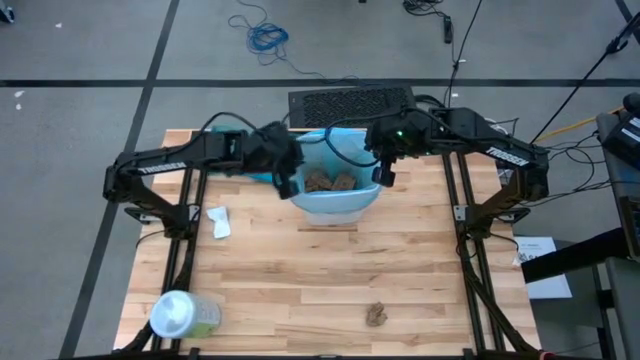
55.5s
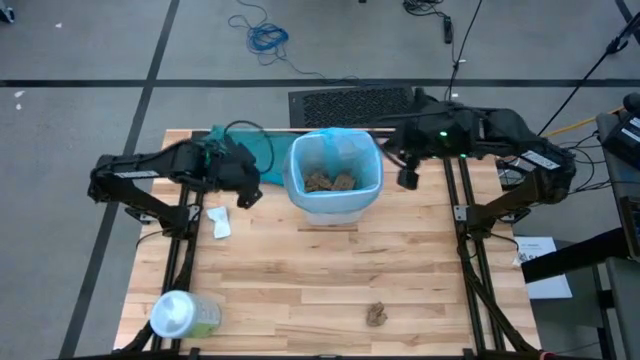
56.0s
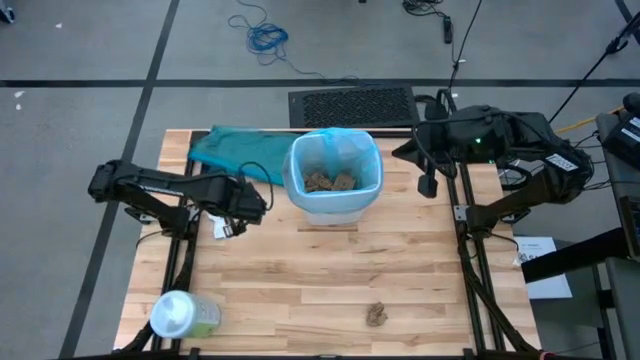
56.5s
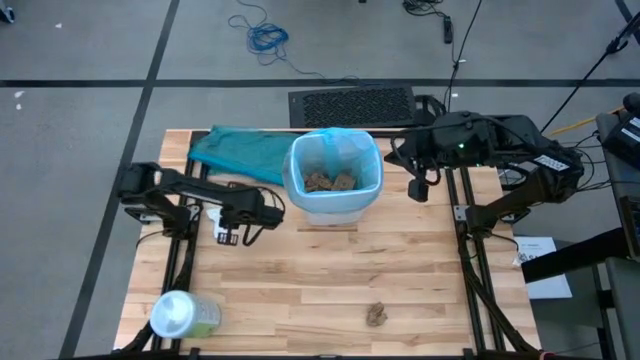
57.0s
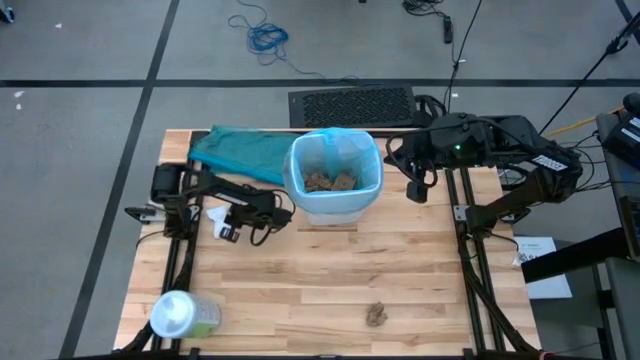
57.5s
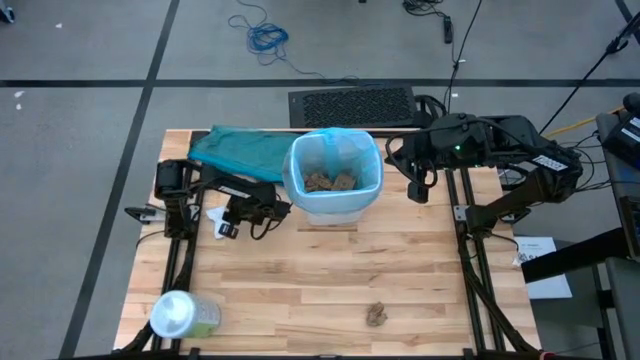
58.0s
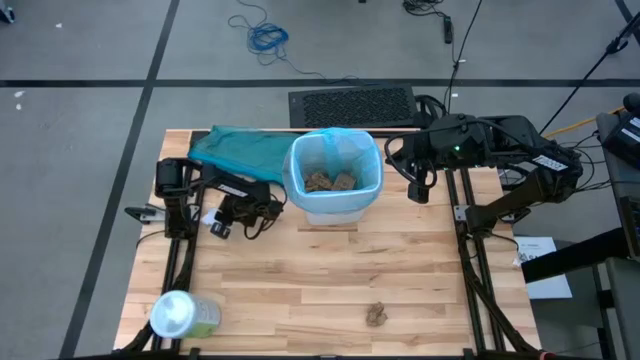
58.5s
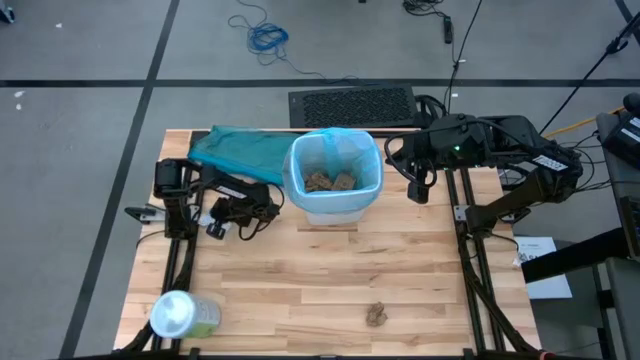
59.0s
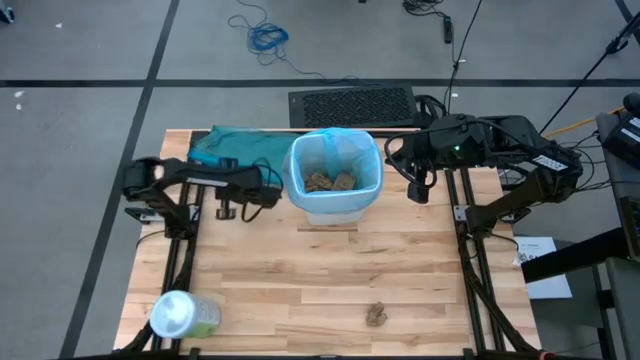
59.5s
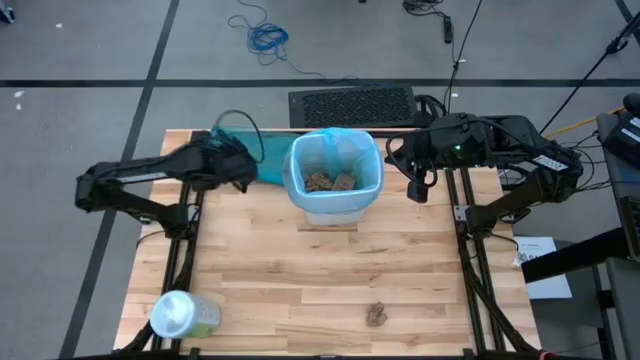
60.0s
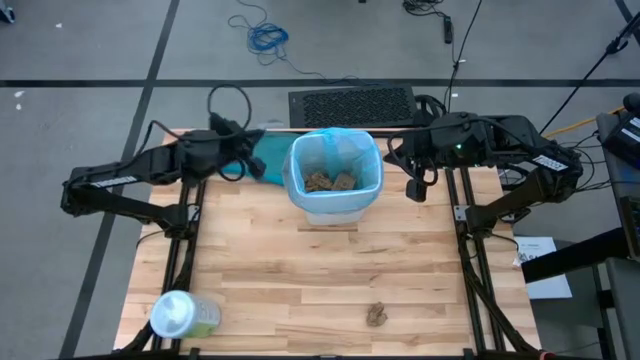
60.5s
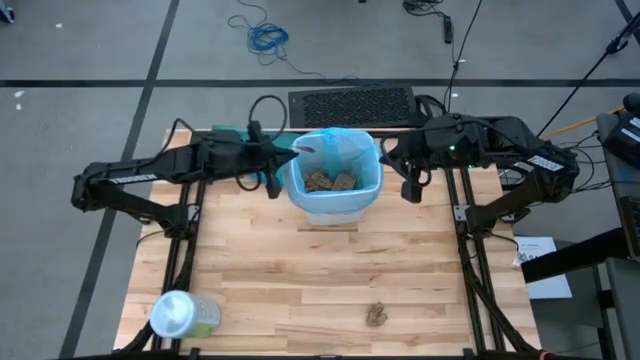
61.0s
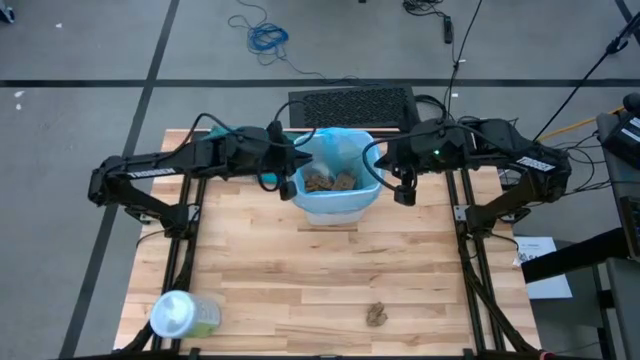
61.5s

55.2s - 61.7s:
Task: place trash/remove bag and relplace
Put the white paper into the trash bin

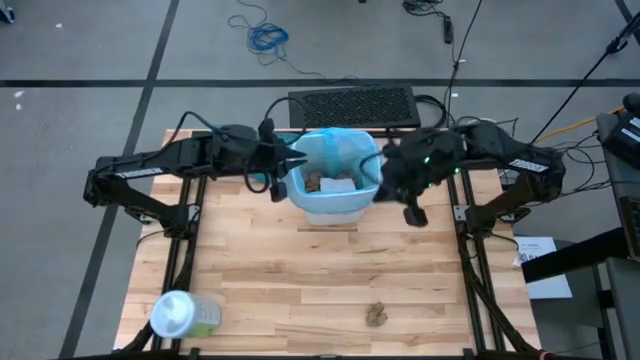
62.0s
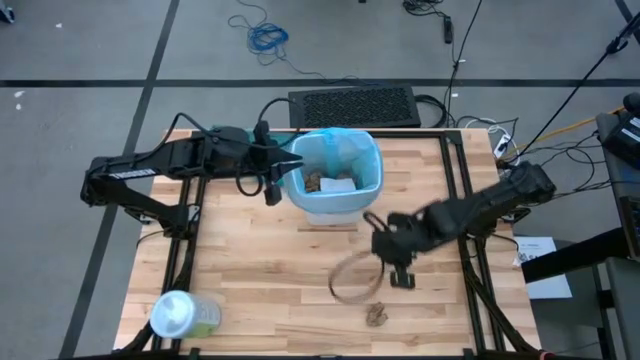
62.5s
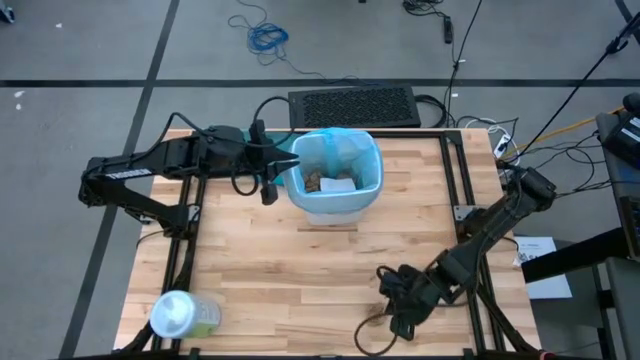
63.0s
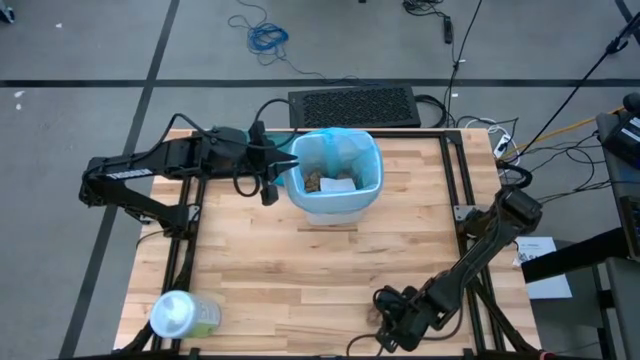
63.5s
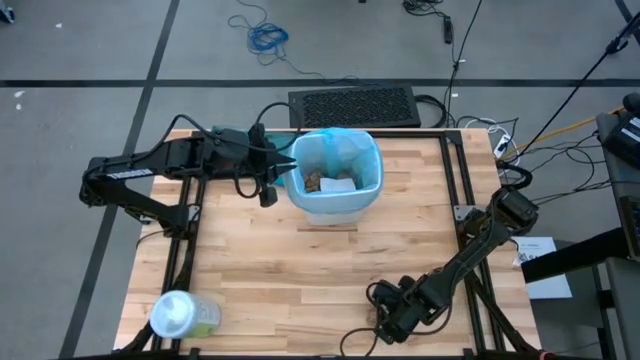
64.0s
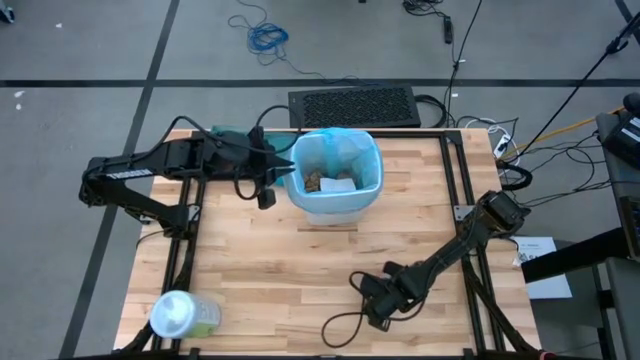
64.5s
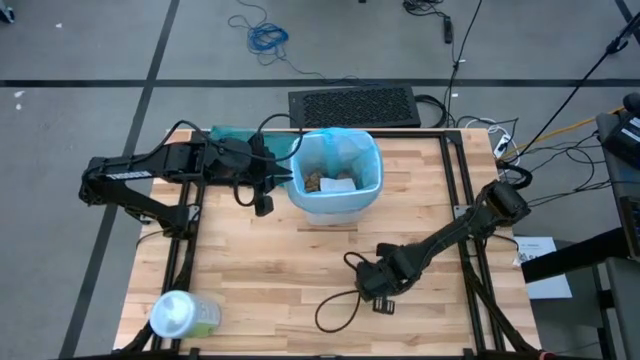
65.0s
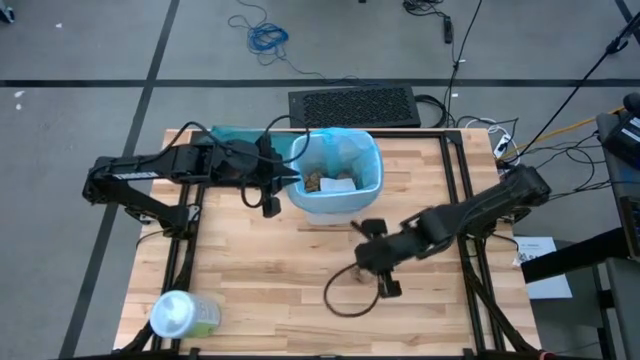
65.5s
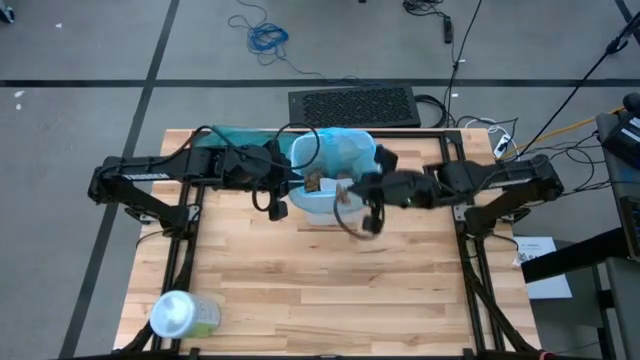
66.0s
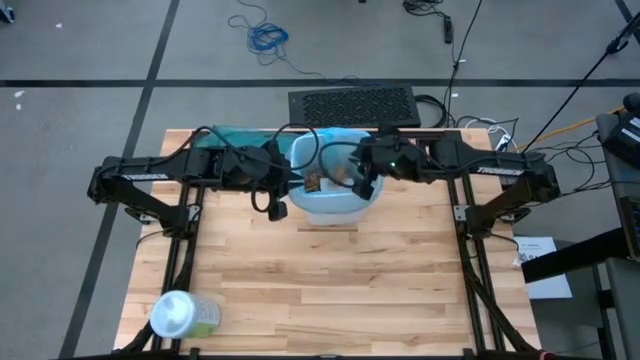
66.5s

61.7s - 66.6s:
Put the brown paper into the trash bin

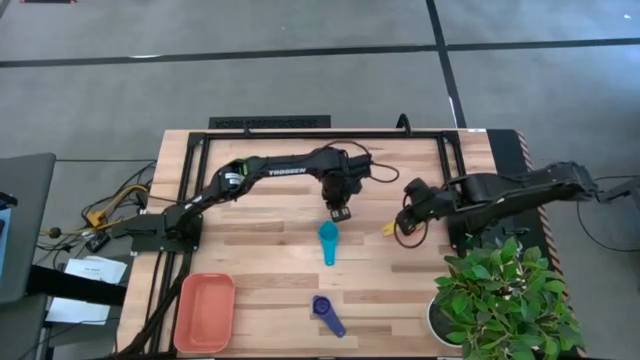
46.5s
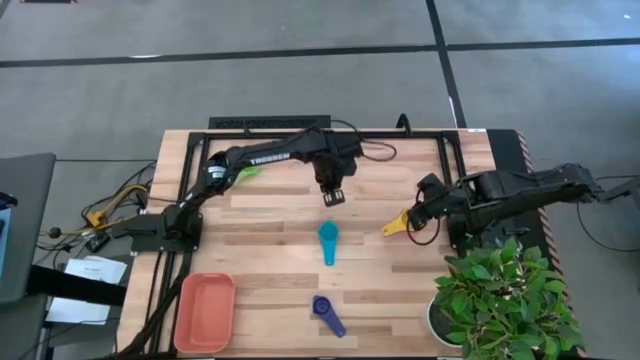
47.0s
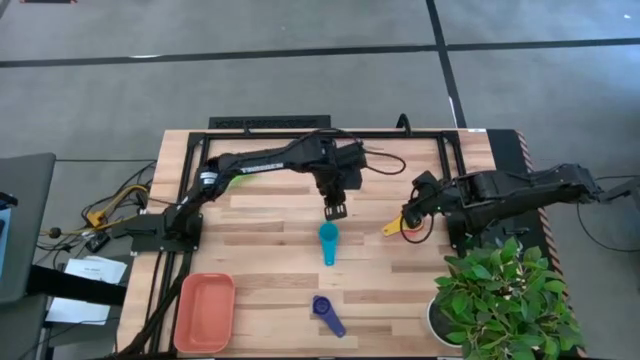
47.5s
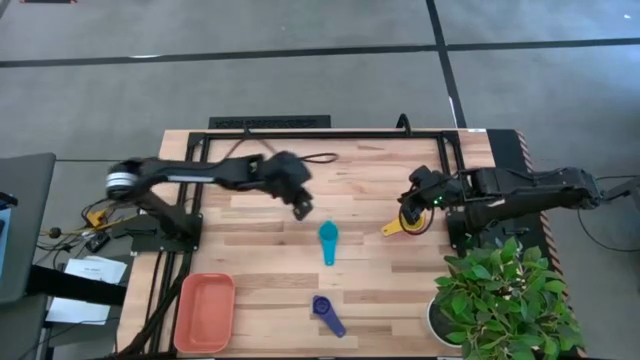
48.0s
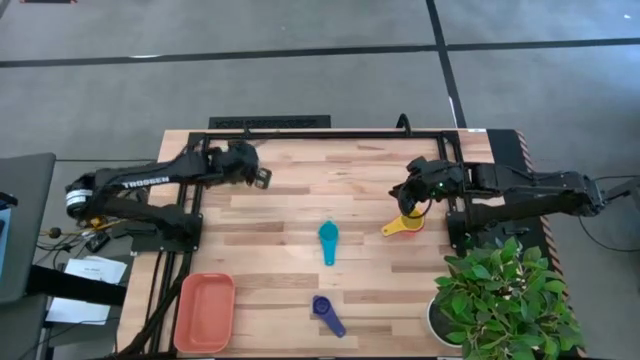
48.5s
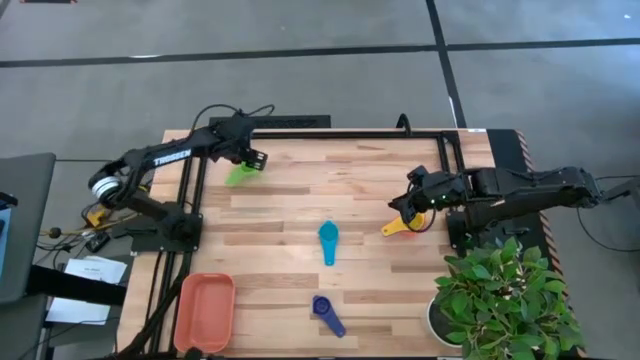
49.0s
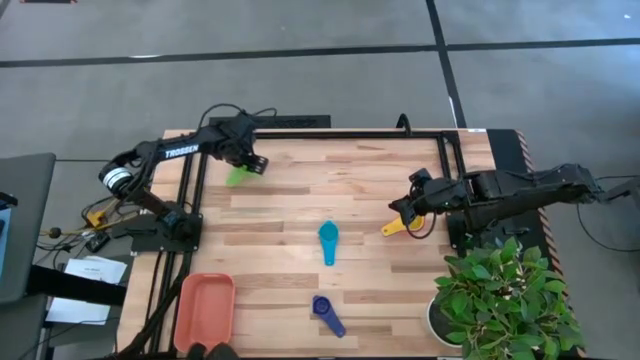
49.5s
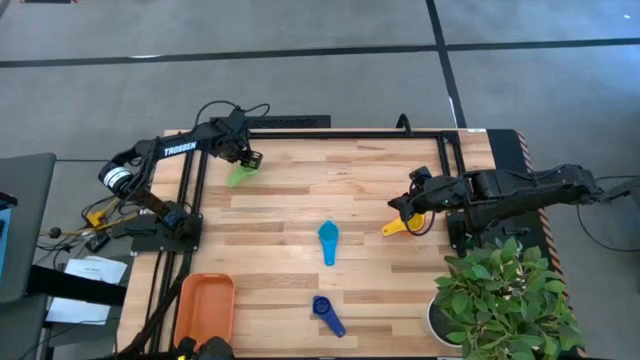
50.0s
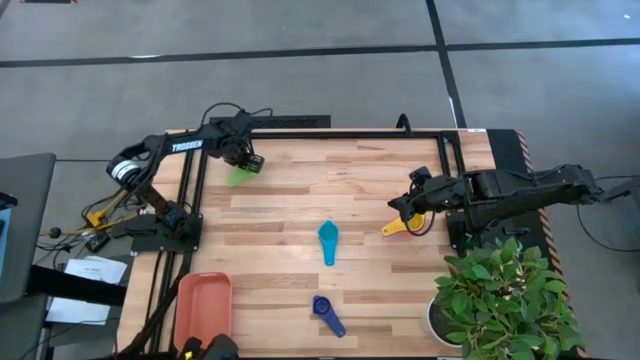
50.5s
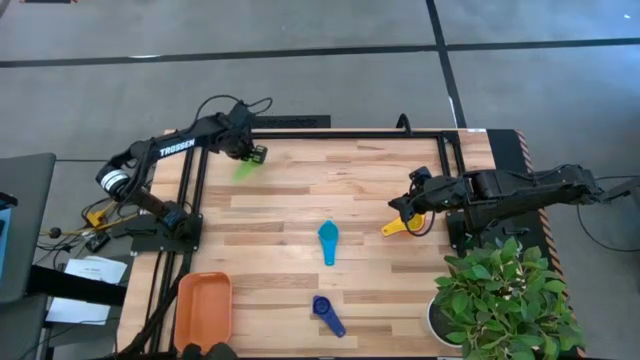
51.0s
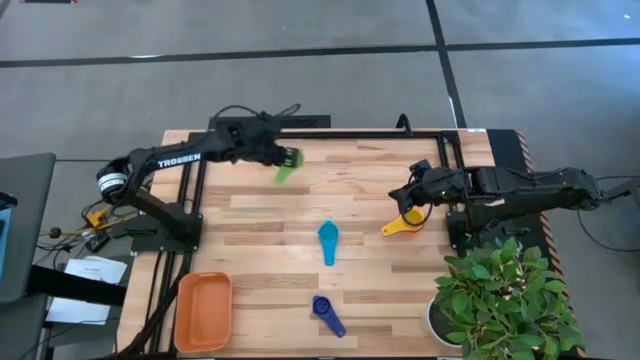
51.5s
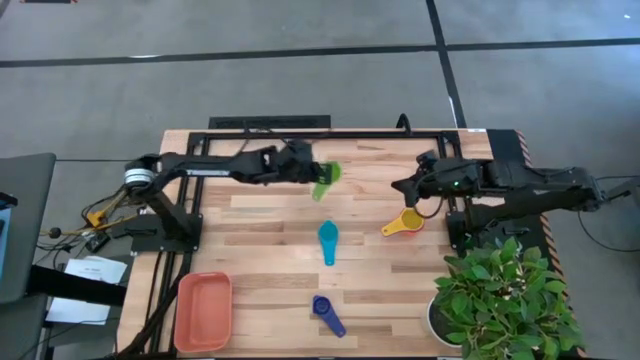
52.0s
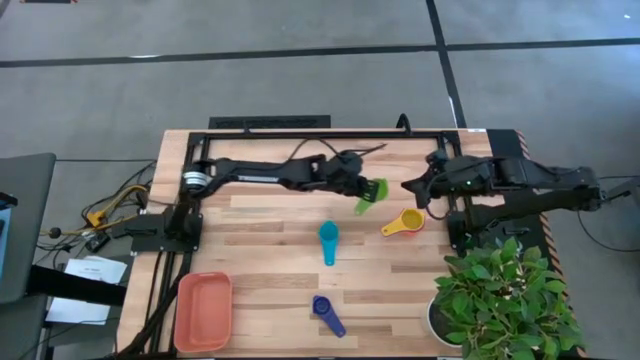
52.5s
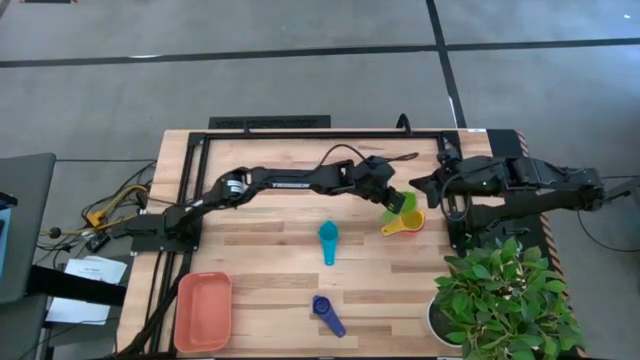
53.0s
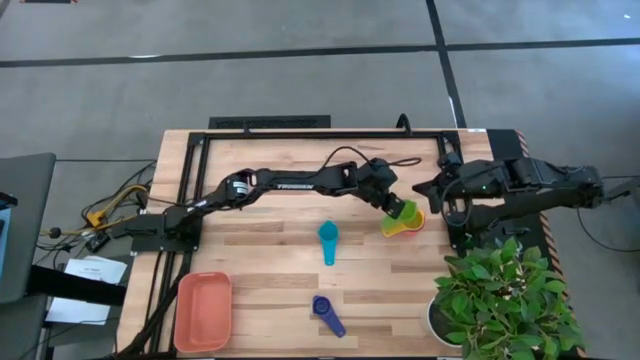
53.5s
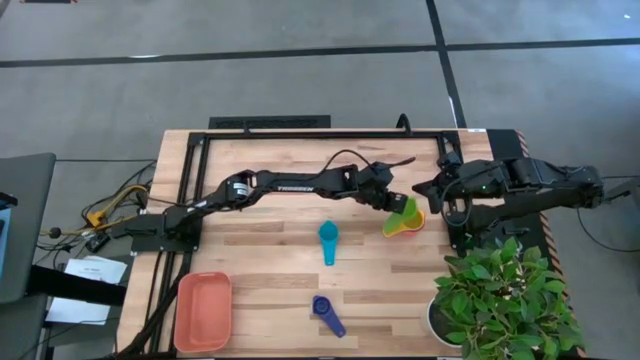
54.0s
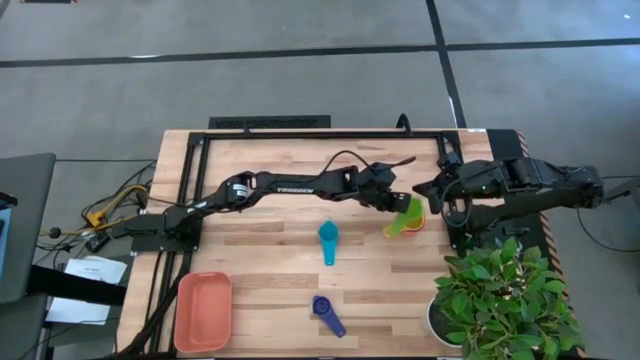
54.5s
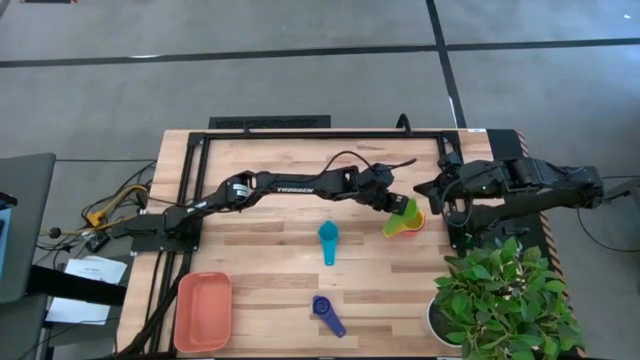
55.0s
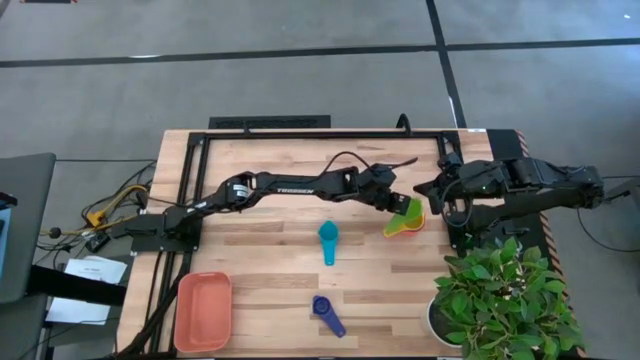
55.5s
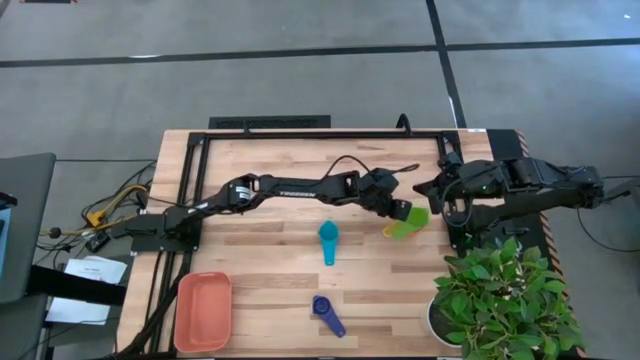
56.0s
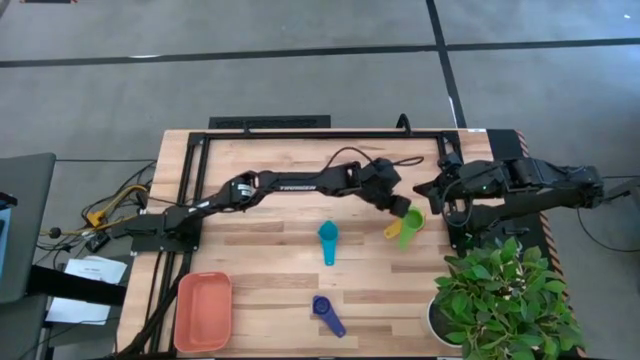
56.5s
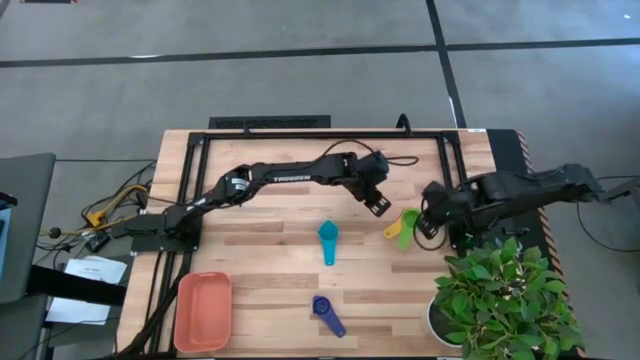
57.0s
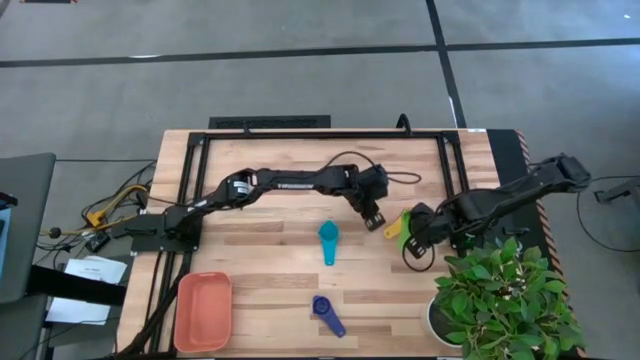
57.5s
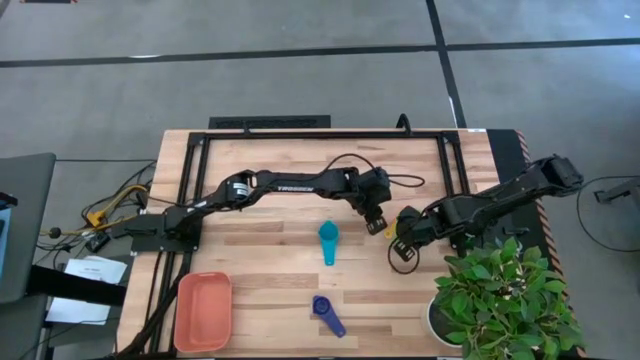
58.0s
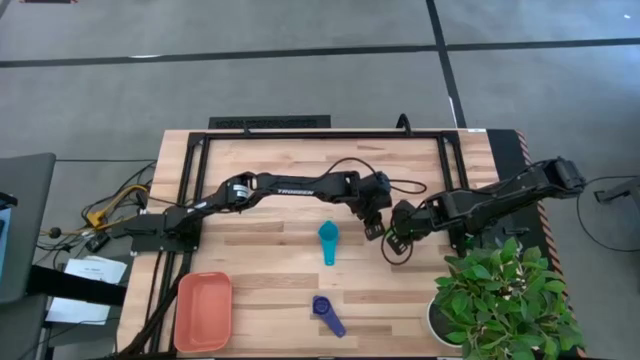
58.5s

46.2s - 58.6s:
Task: Nest measuring cups in basket
Stack the green measuring cup on top of the yellow measuring cup
